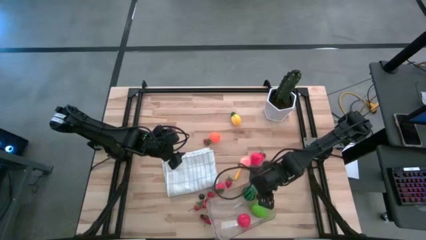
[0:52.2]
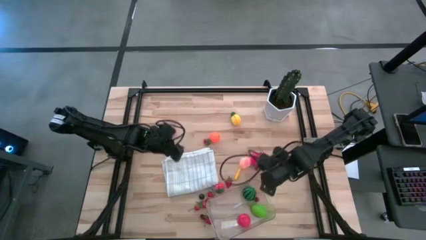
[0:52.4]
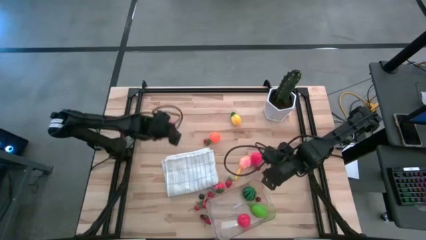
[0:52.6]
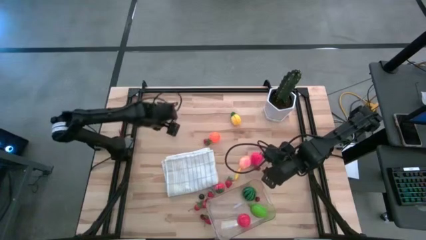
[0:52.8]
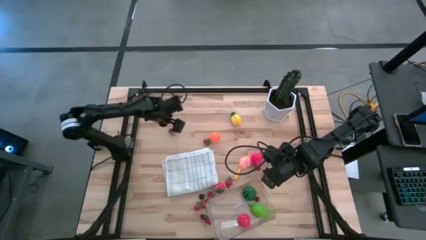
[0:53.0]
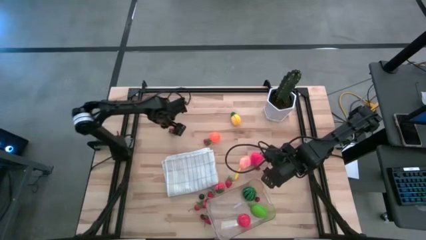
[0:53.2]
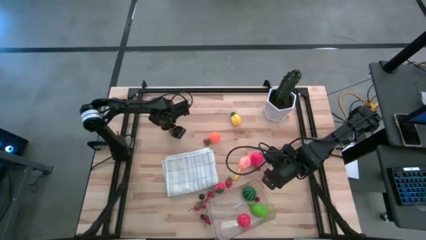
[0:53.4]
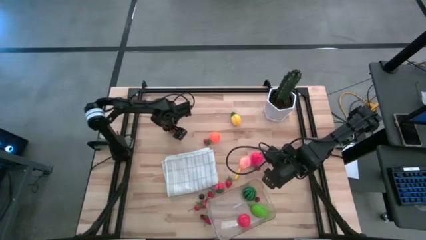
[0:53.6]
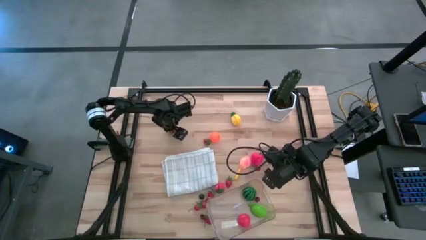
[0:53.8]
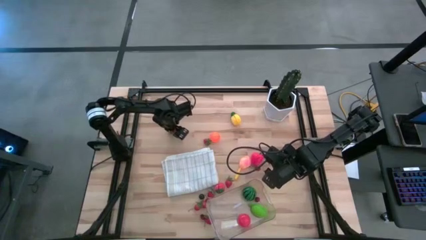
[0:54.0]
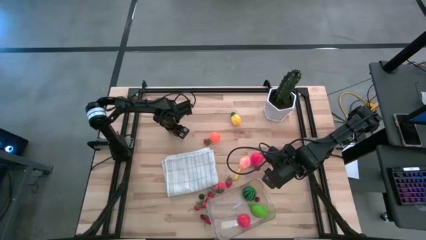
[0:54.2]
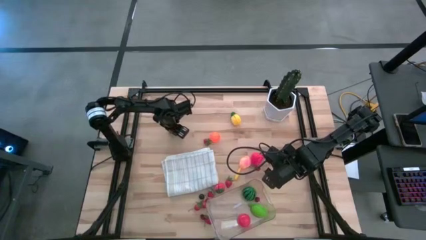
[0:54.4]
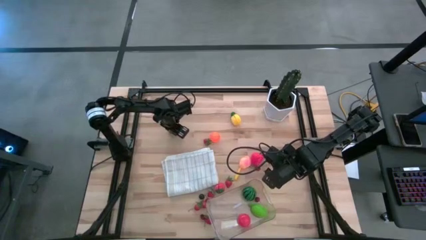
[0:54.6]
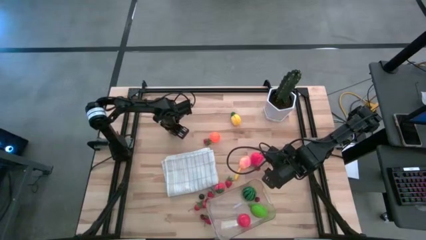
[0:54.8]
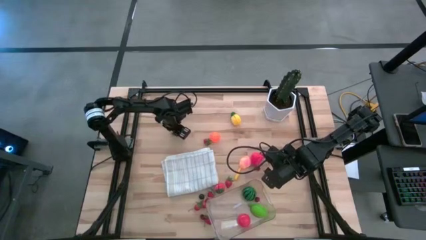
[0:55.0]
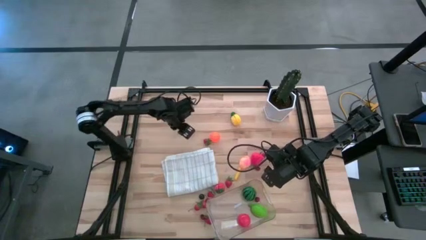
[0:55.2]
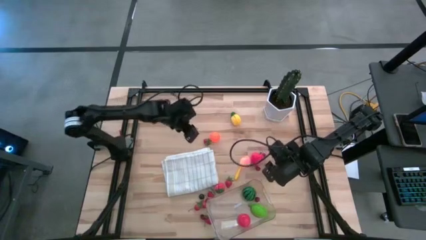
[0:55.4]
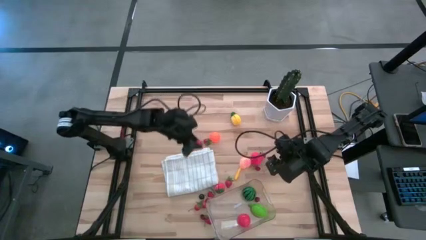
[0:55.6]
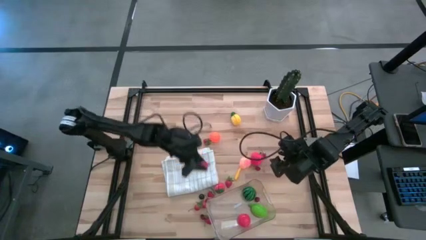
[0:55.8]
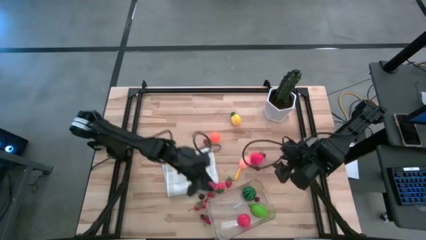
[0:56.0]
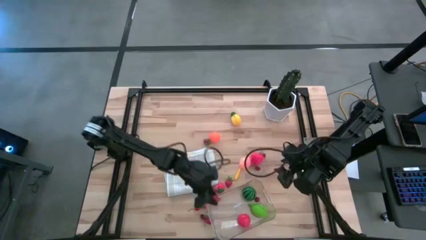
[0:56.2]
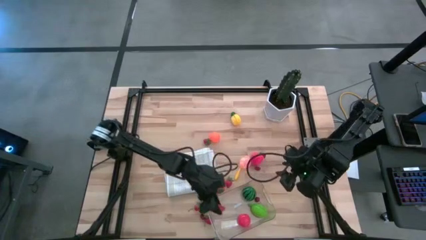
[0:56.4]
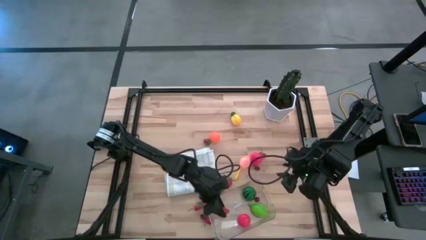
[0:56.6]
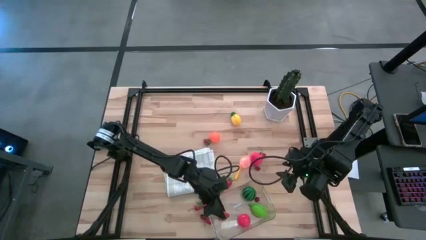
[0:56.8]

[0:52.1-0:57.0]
Task: Pick and placing Produce into tupperware
Put the strawberry into the transparent bin

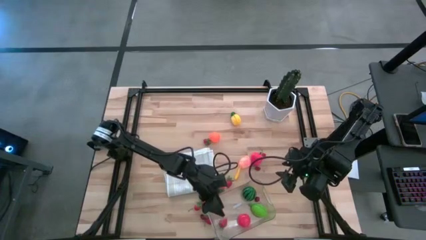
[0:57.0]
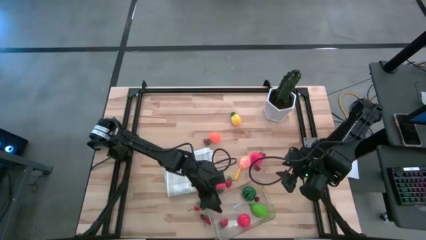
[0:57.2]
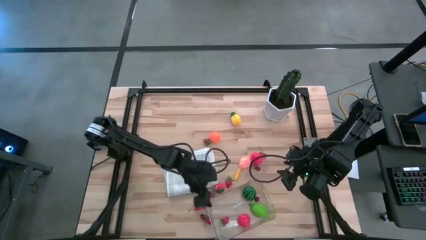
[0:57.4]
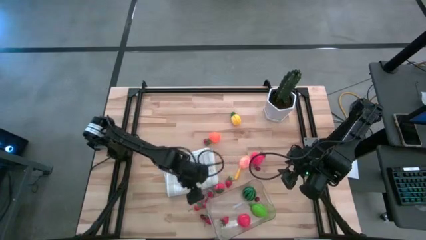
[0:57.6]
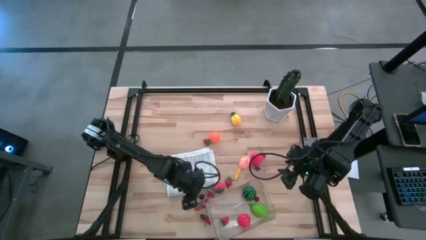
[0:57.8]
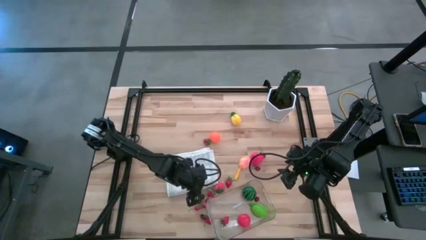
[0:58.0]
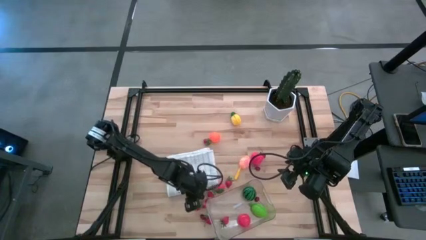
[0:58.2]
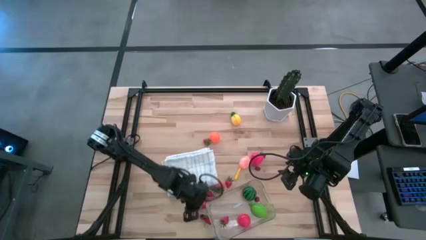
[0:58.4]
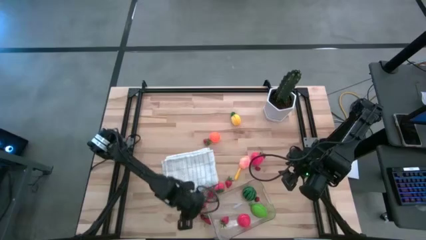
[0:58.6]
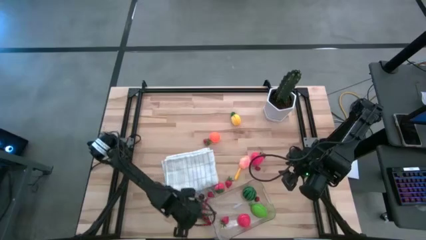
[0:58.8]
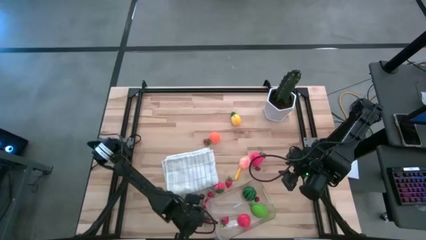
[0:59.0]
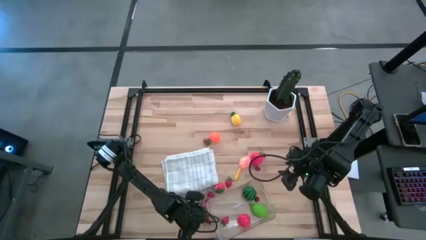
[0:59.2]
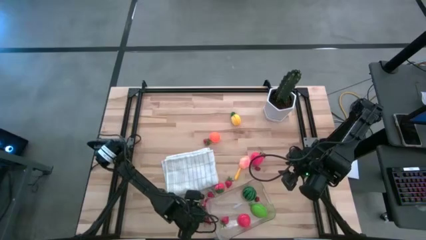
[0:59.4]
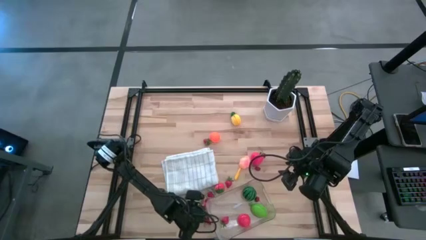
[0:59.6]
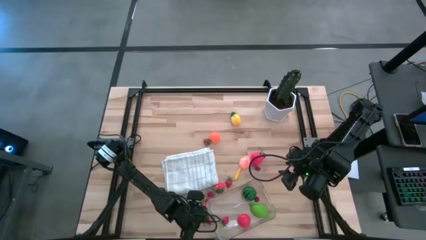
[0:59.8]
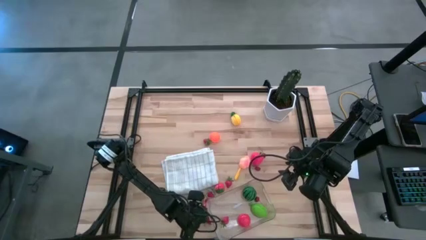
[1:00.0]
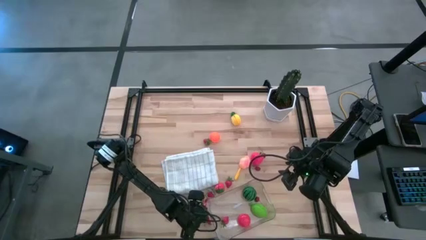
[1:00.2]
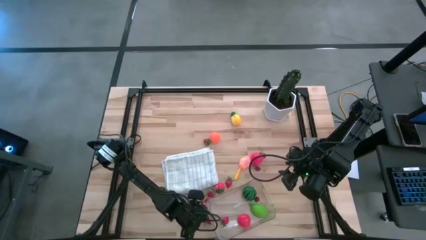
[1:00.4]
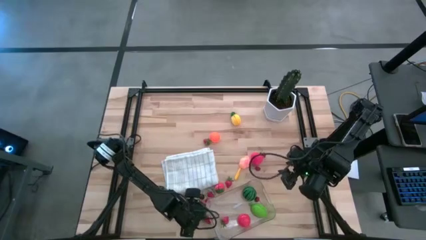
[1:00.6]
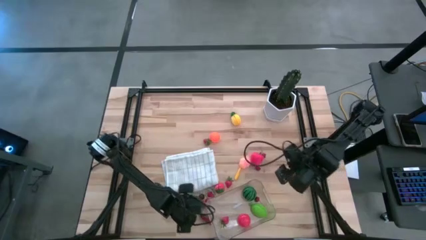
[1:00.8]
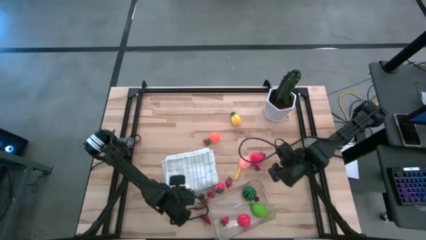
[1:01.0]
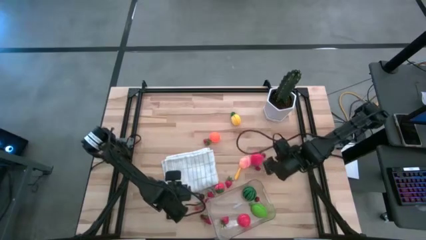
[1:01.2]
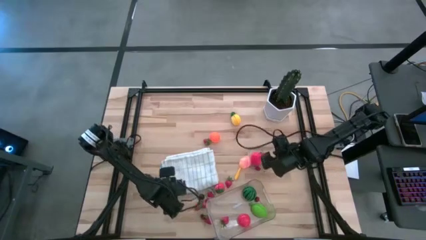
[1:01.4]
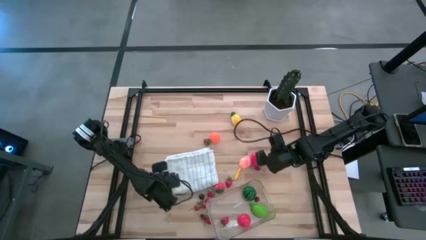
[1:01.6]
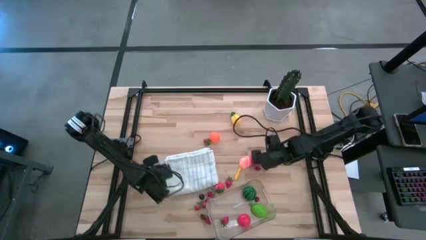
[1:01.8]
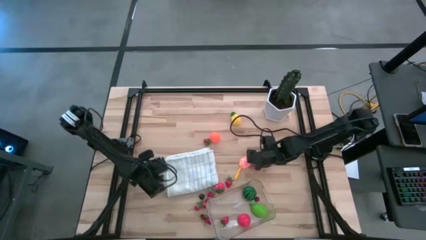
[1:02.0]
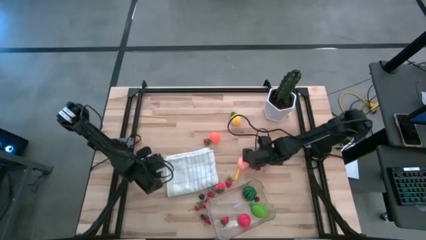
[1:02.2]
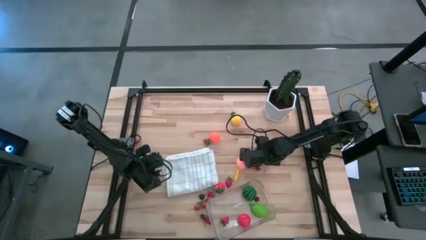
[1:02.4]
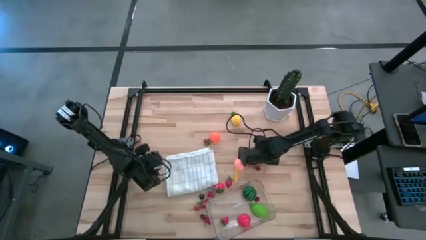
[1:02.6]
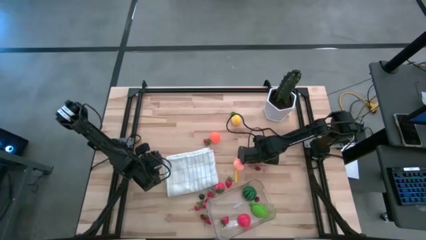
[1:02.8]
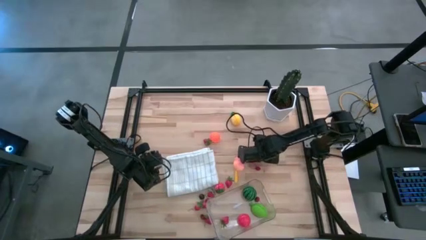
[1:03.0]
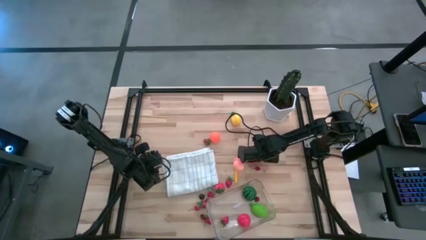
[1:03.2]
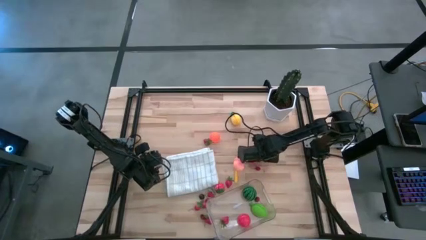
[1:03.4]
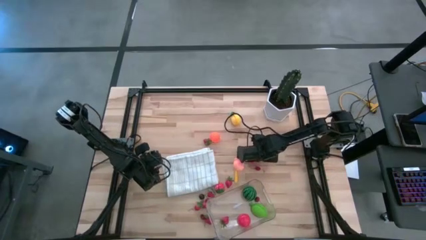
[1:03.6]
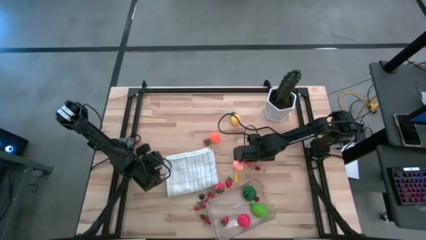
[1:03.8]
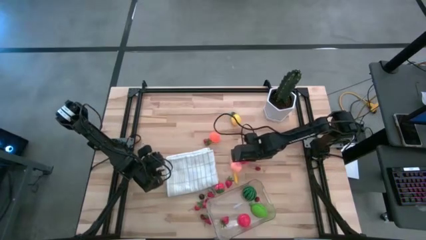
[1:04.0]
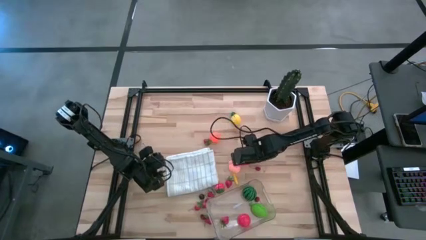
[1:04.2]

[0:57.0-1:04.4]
Put the apple into the transparent bin

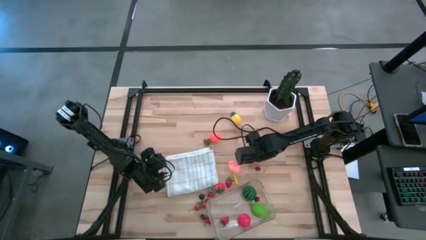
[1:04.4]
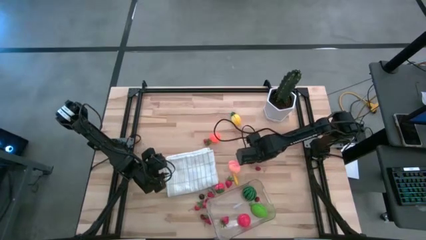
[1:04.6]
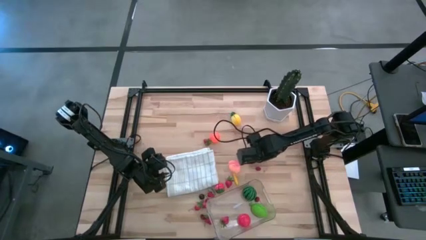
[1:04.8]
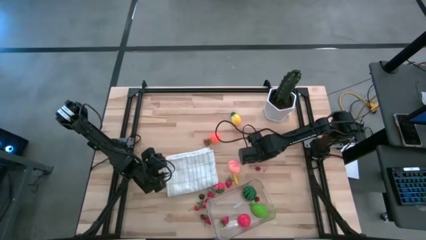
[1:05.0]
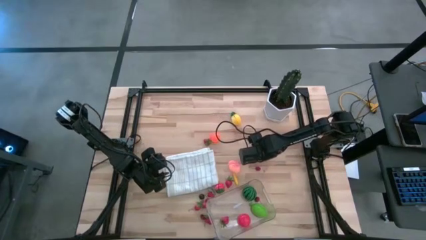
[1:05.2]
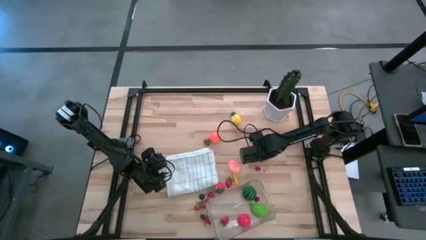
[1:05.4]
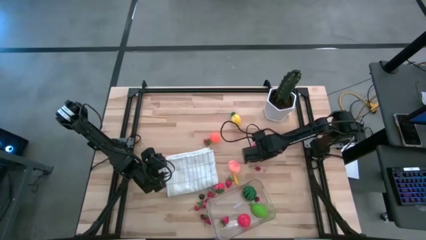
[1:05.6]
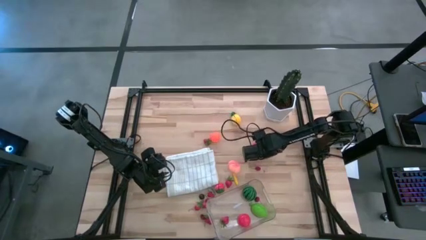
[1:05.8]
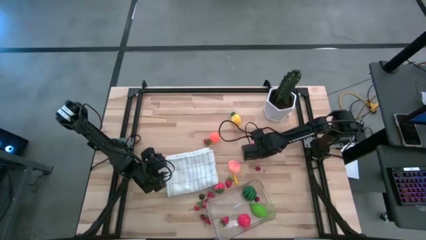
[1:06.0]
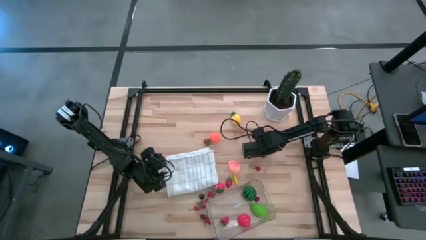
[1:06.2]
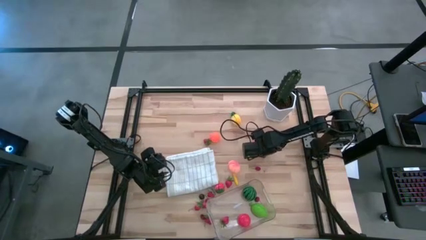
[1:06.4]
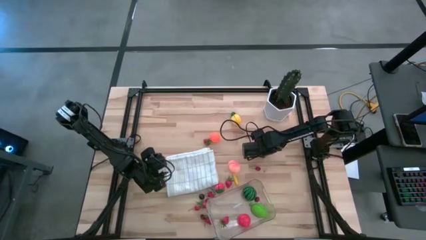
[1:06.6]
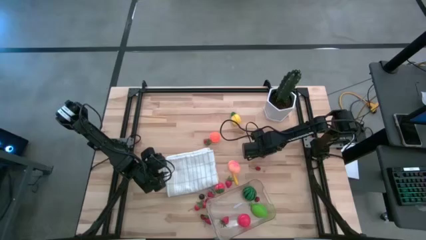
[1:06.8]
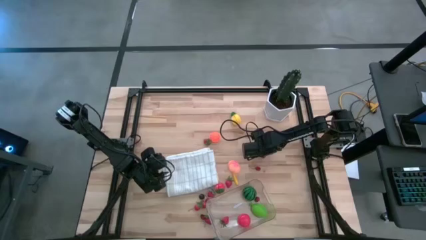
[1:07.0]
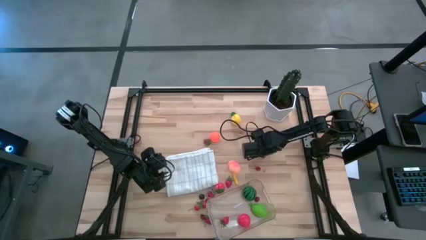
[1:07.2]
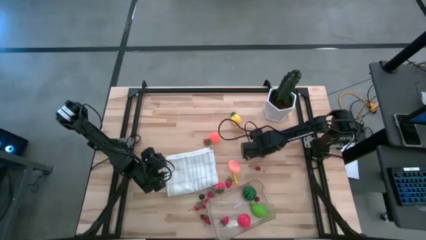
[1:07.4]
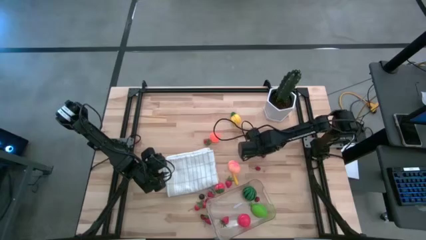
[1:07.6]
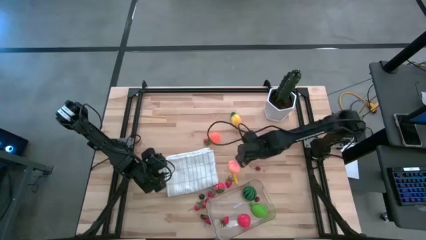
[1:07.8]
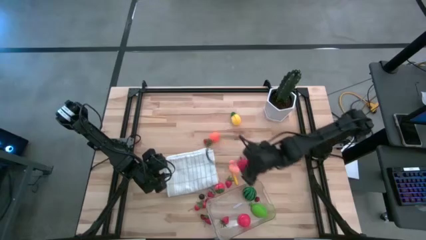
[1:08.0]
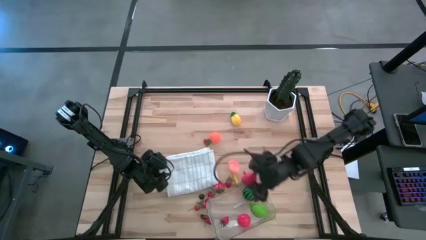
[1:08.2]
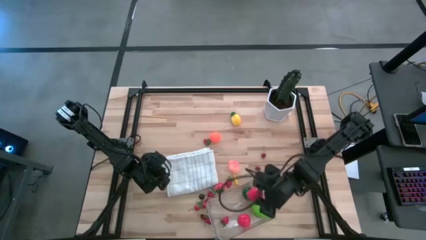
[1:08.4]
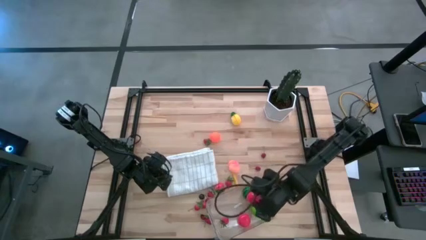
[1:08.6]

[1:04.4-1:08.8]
Put the apple into the transparent bin

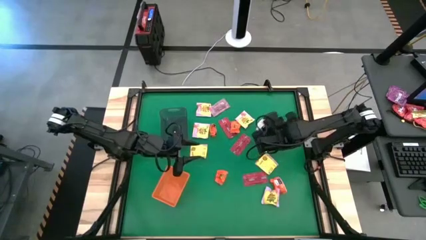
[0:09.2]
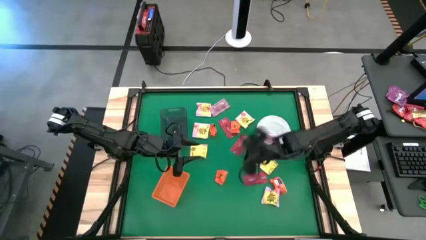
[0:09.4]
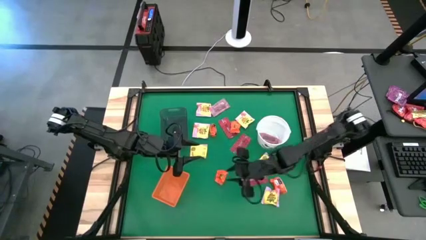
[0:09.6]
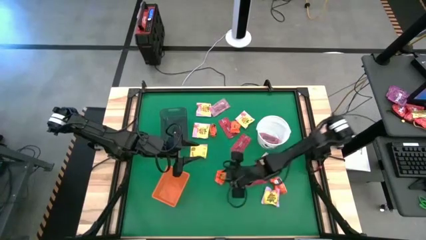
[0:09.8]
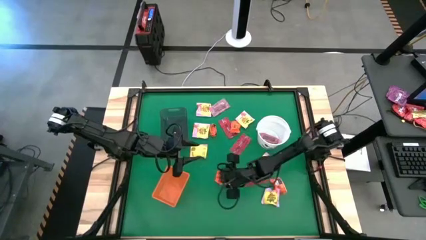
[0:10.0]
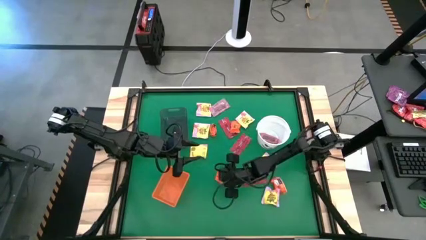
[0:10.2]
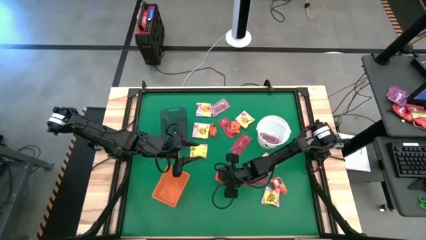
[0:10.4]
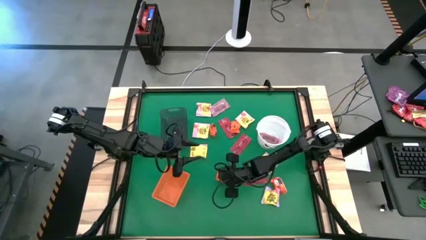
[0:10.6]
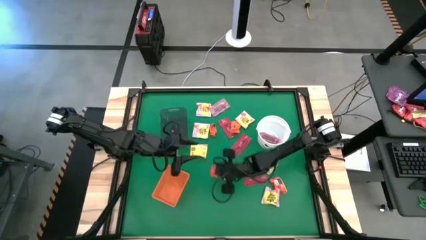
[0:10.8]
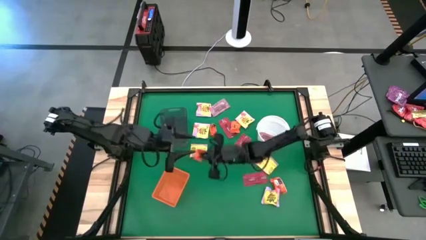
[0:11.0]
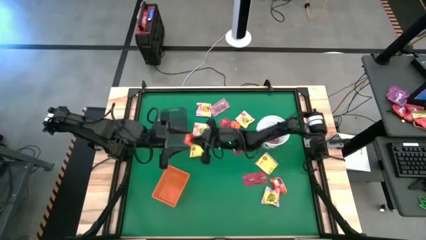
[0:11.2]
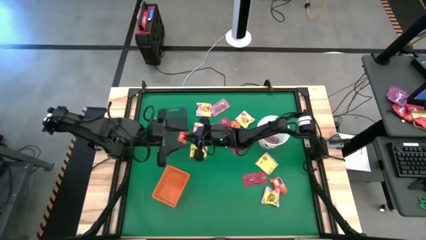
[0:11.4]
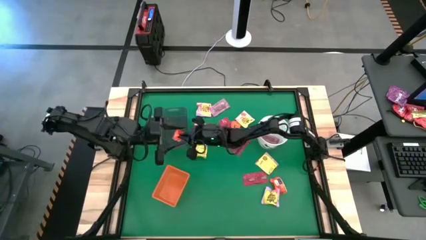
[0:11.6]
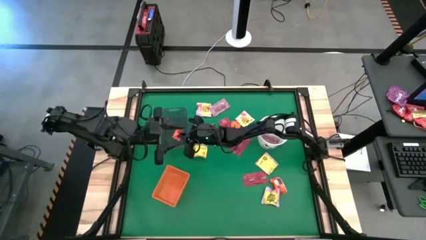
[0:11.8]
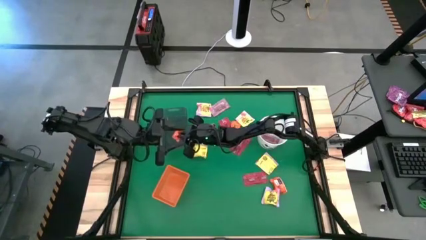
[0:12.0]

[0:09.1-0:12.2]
Task: Sort candy by brand, put in halloween buckets
Put the orange chocolate into the black bin
